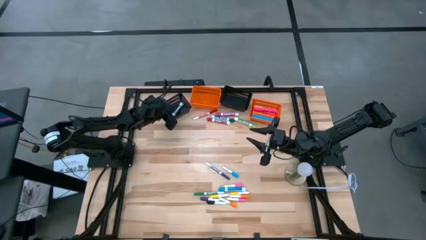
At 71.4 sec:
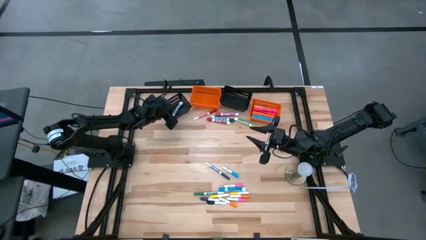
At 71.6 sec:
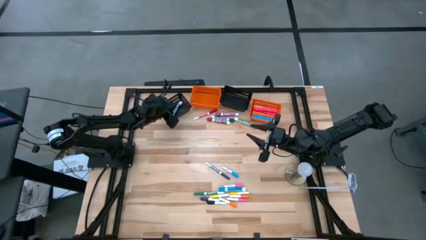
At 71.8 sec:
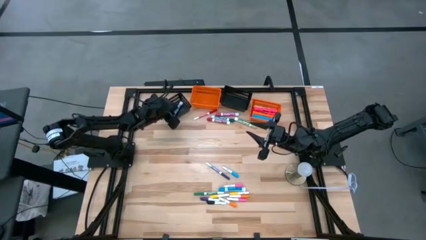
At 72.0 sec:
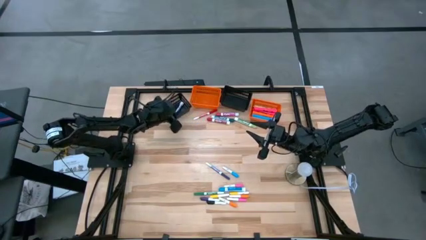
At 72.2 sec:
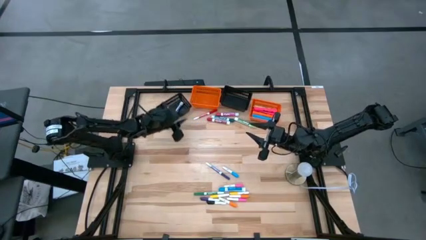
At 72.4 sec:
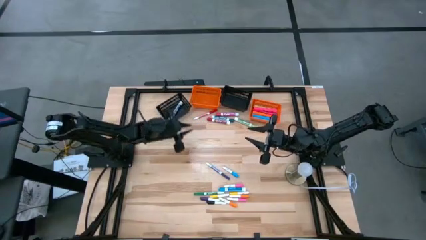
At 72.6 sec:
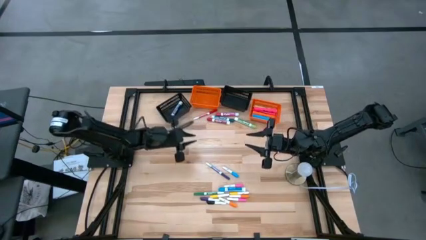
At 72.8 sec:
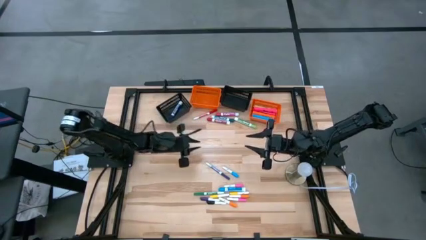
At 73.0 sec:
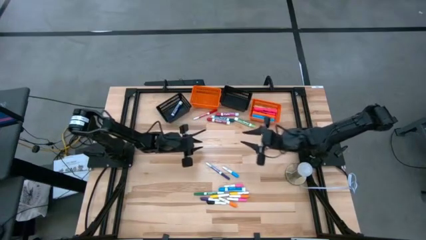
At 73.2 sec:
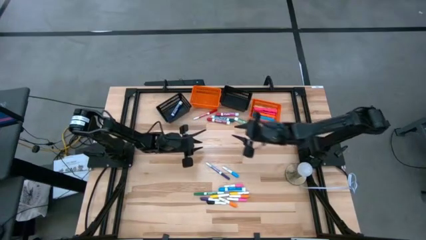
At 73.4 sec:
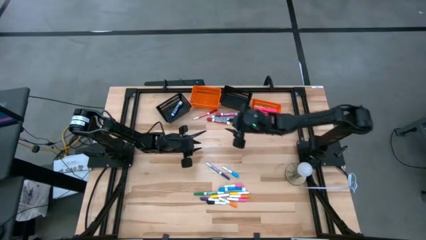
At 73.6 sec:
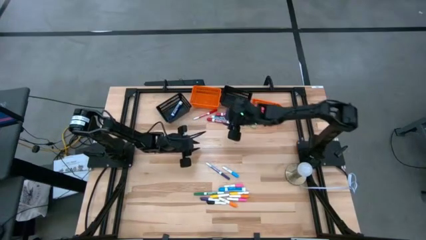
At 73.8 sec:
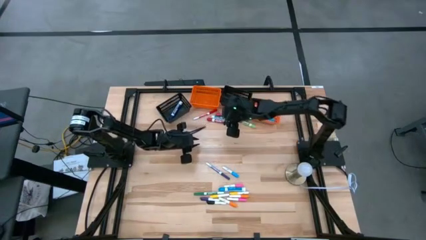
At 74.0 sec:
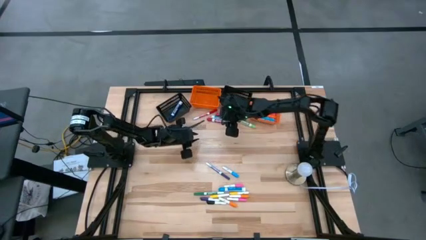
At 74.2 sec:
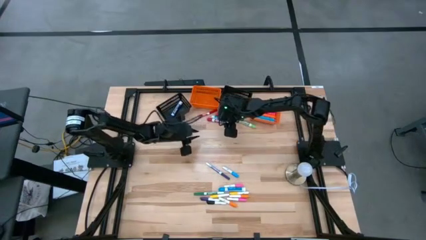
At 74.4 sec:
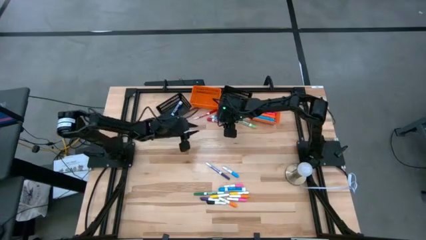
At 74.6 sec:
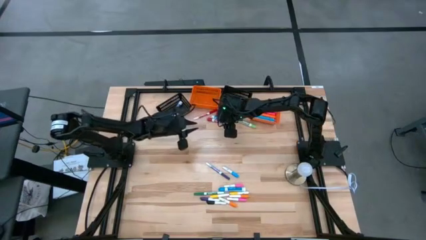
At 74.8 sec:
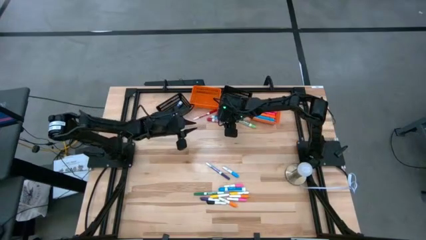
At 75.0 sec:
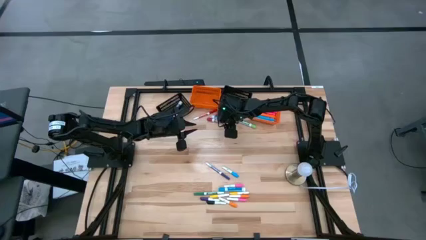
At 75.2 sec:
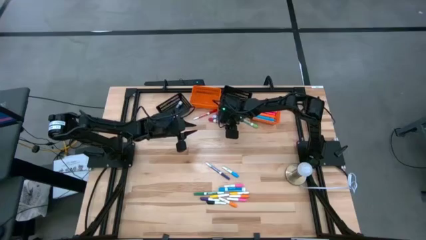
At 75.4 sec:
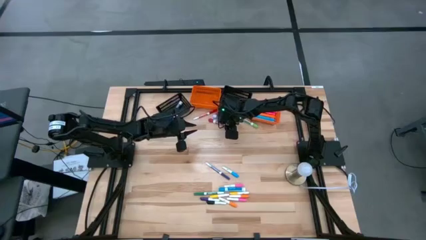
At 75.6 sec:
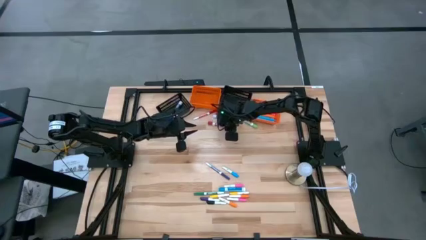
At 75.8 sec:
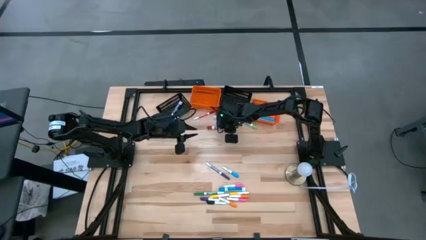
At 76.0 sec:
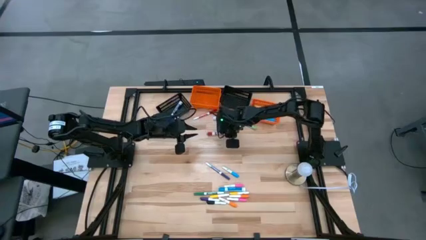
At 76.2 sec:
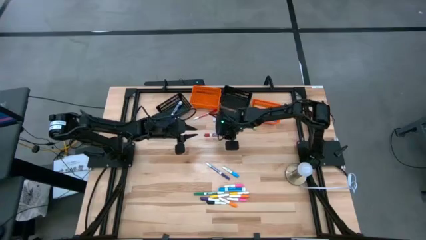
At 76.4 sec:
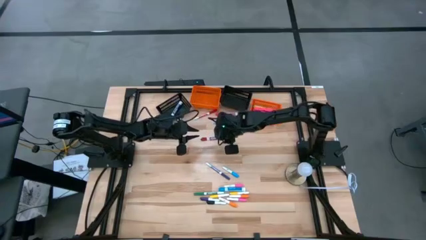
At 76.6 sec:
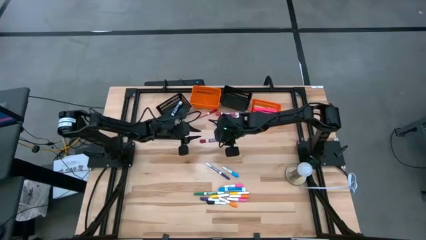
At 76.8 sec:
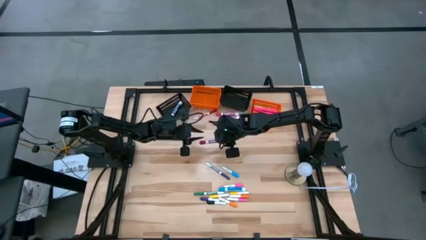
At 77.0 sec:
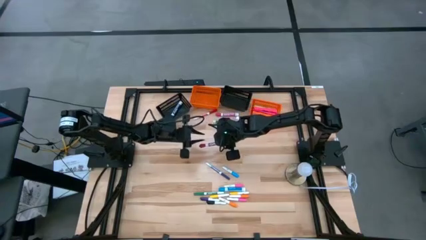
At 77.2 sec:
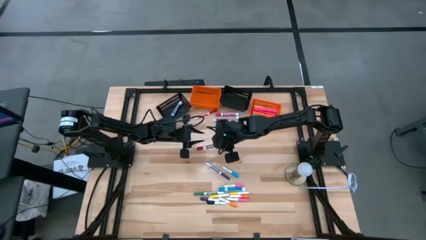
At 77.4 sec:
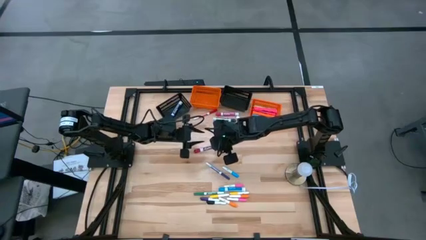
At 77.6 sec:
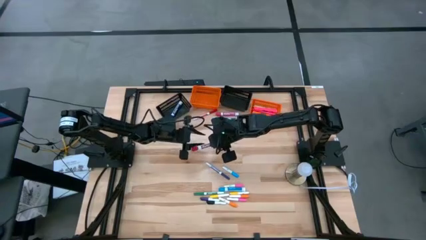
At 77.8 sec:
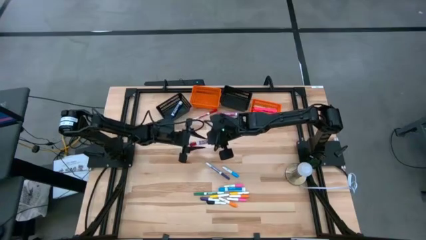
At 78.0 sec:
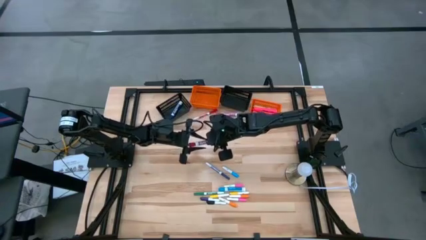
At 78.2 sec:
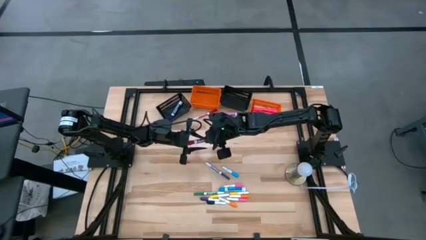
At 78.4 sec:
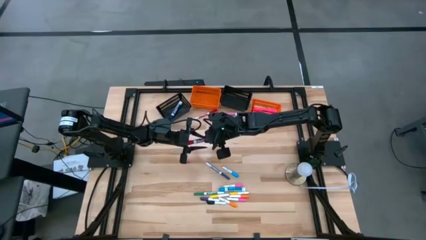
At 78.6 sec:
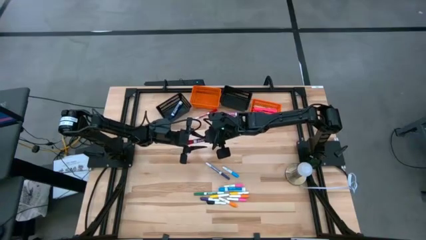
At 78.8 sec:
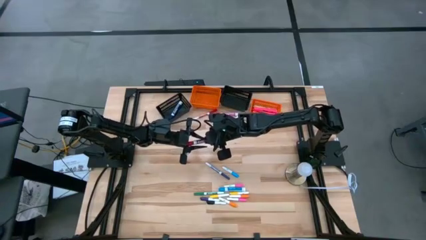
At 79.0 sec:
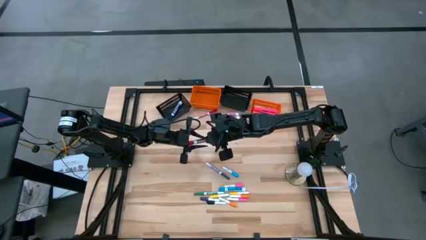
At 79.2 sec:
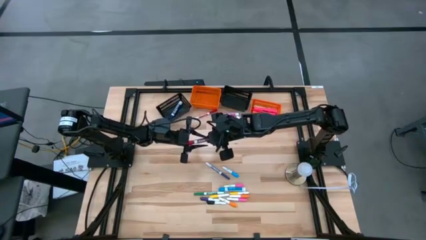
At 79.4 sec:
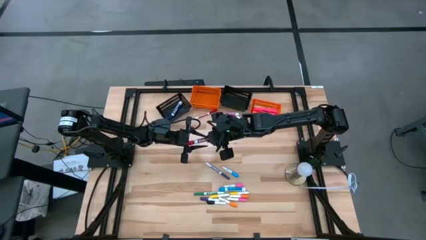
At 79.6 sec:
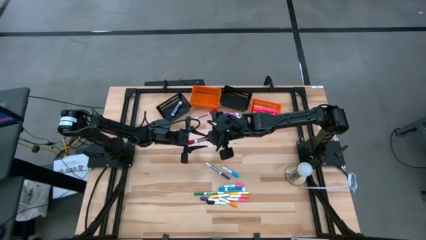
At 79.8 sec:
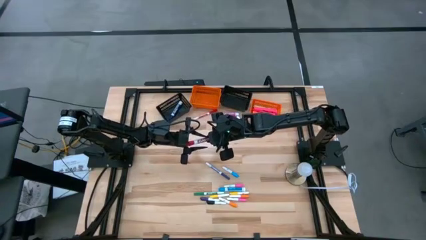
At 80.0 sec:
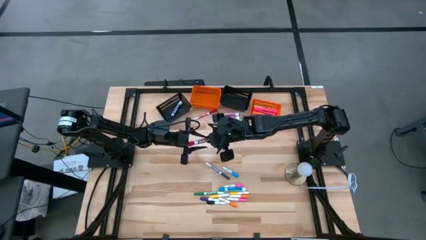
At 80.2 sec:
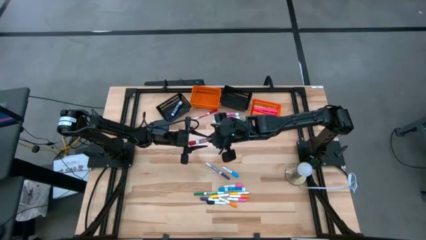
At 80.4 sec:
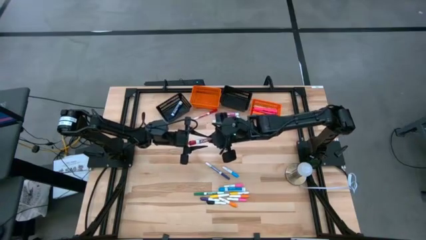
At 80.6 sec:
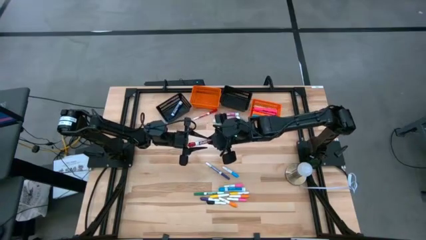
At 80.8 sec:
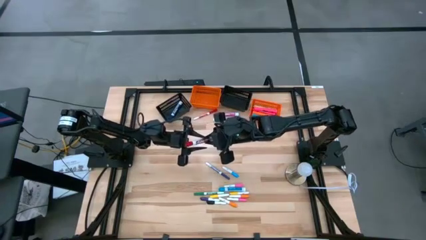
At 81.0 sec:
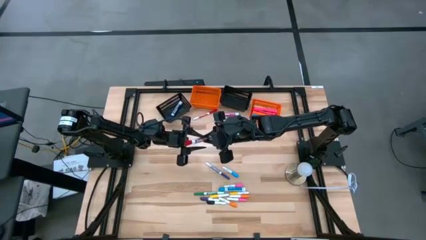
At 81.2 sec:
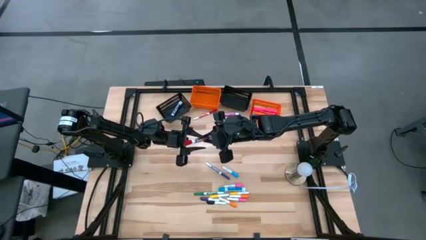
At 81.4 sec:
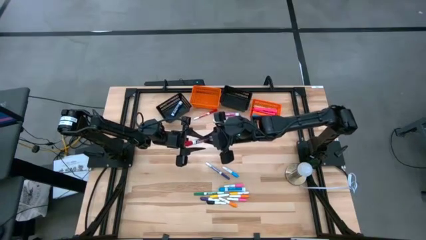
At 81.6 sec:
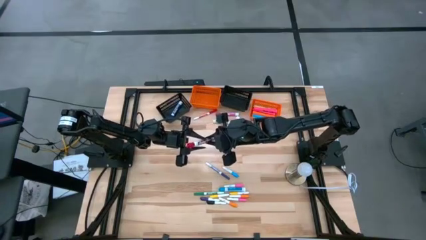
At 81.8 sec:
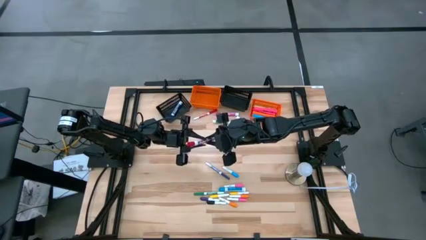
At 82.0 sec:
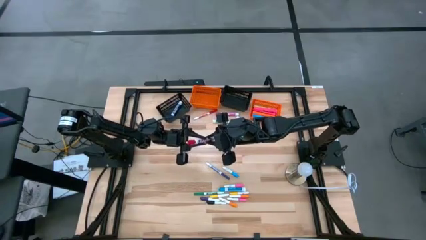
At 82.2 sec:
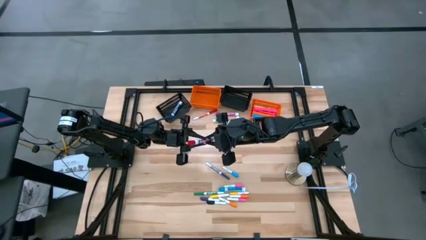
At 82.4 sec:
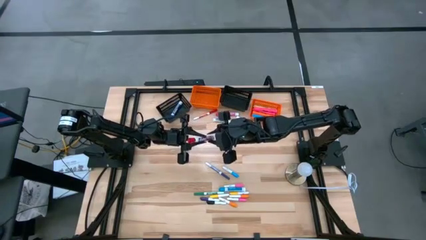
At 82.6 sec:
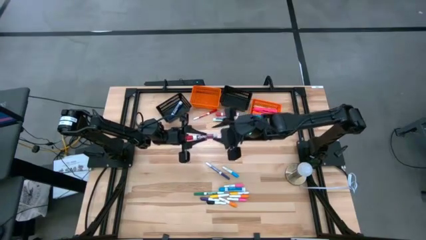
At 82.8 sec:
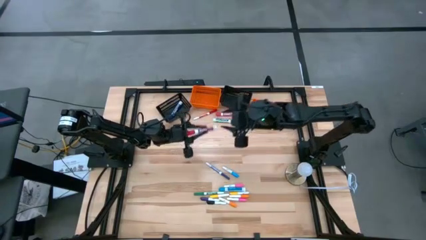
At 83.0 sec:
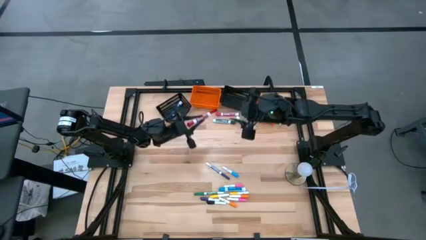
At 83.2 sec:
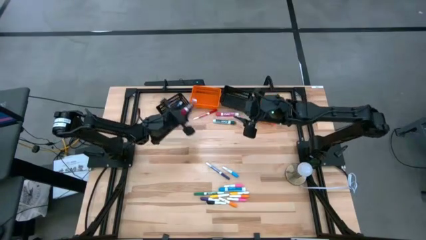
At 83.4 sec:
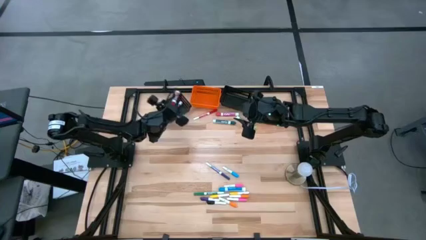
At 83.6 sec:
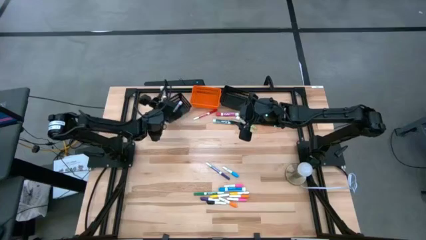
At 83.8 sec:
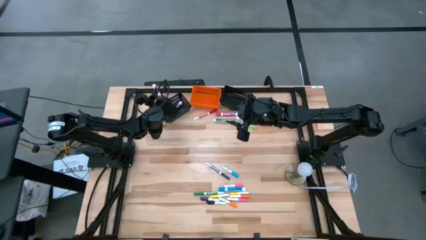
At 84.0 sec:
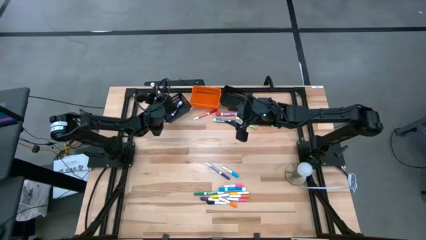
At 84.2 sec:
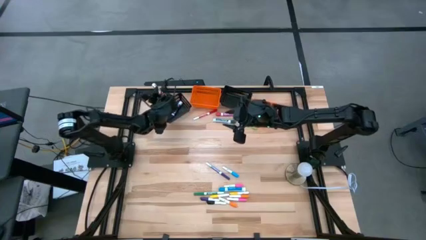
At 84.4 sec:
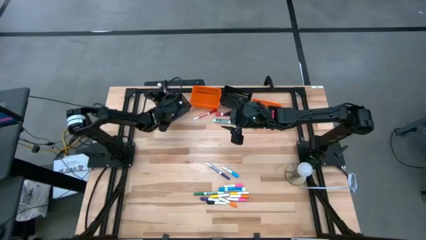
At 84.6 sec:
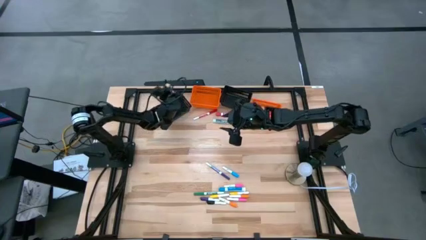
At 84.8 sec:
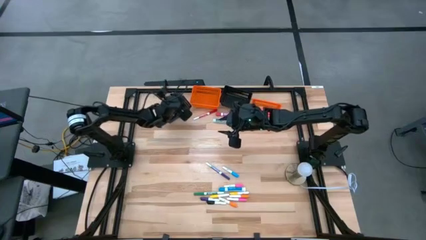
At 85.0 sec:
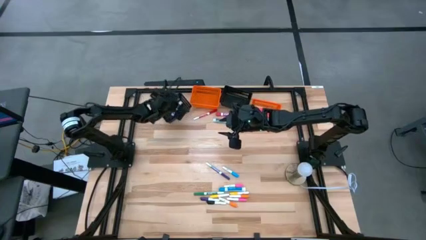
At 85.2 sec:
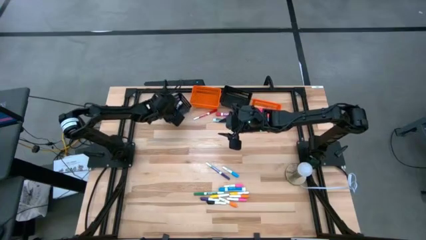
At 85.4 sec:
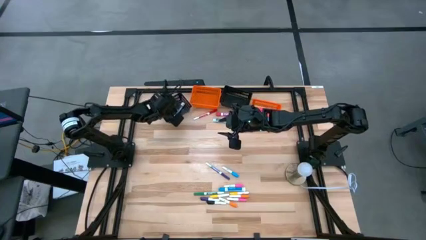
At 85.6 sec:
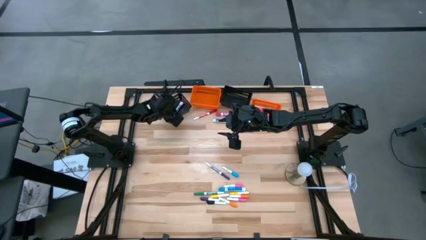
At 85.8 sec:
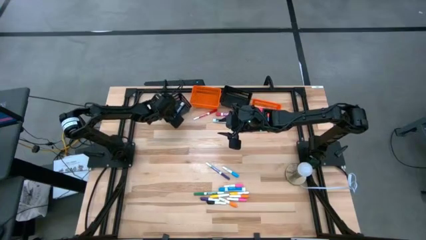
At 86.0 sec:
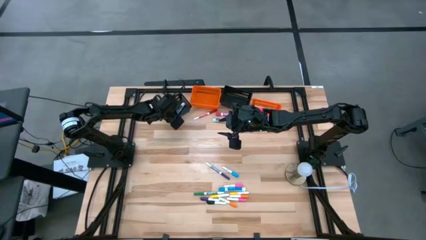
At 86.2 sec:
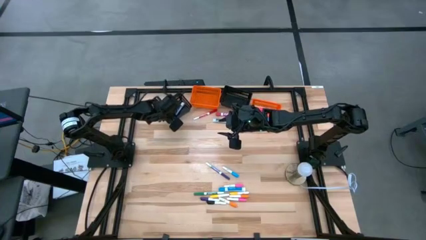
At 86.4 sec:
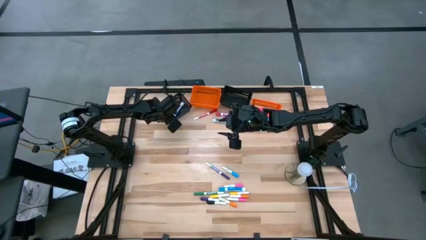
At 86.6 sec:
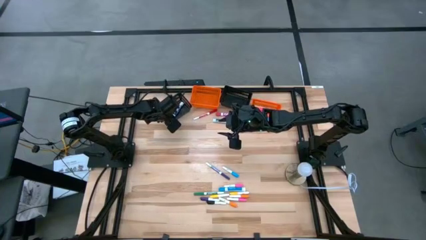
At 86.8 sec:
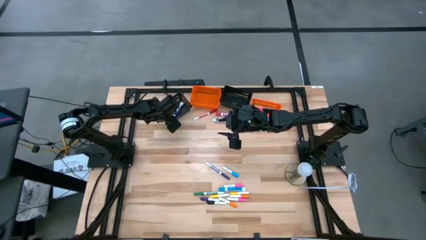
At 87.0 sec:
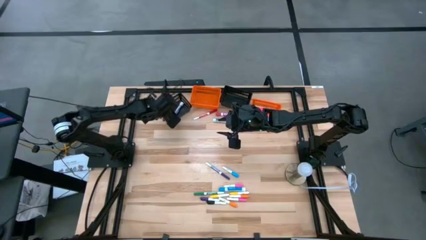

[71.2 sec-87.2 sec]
Task: Pick & Place Markers
Put the large red marker into the left black bin
